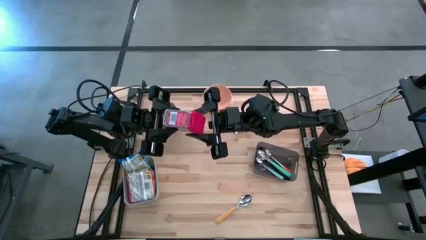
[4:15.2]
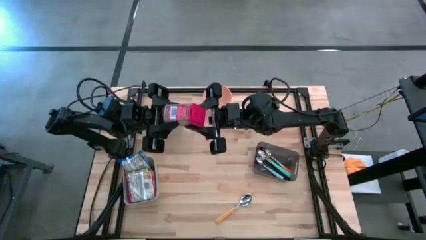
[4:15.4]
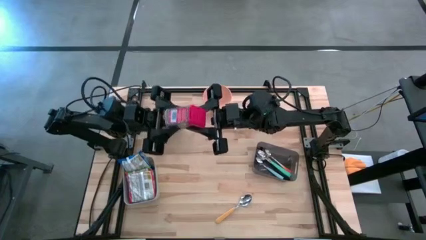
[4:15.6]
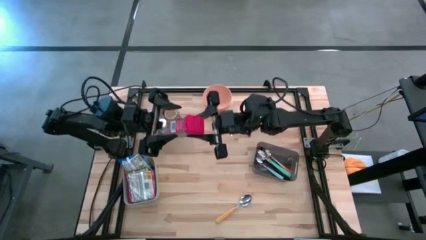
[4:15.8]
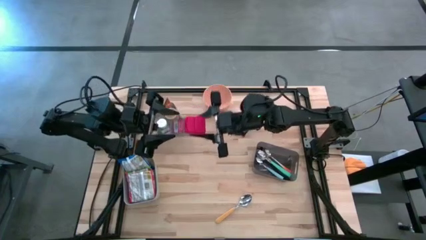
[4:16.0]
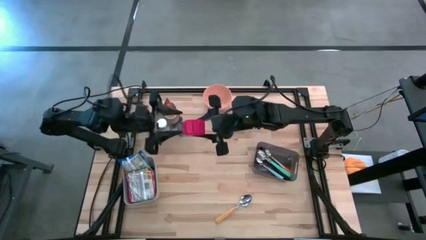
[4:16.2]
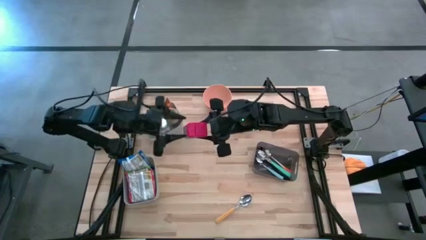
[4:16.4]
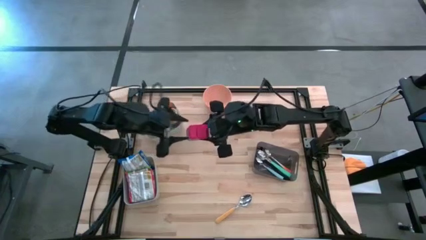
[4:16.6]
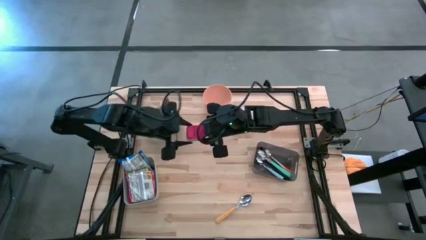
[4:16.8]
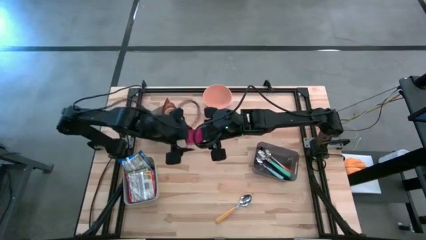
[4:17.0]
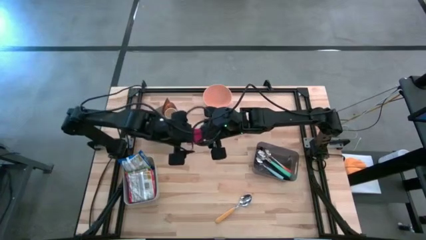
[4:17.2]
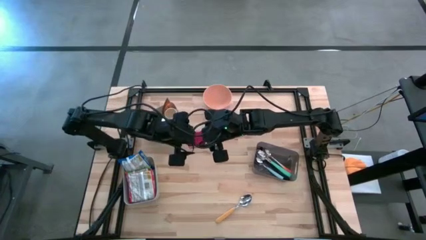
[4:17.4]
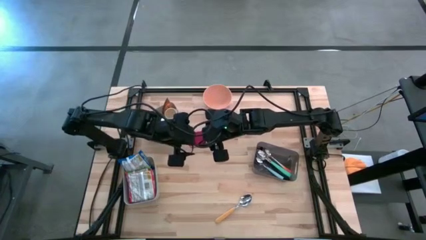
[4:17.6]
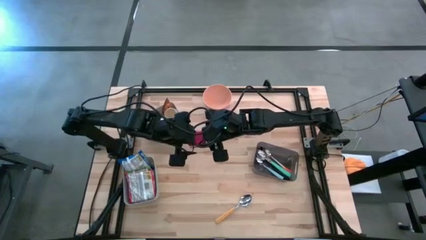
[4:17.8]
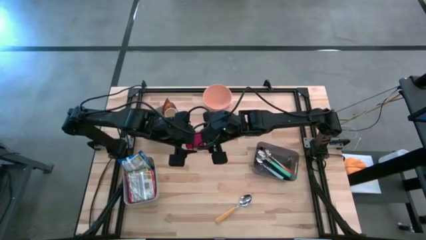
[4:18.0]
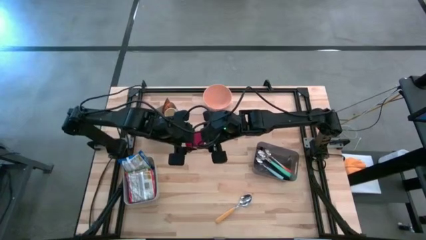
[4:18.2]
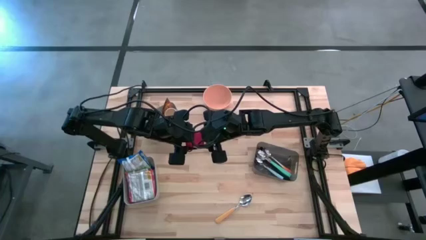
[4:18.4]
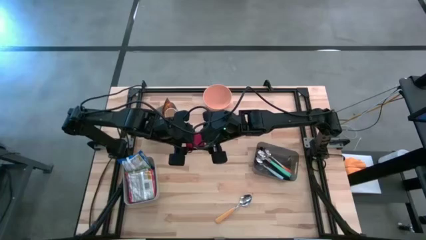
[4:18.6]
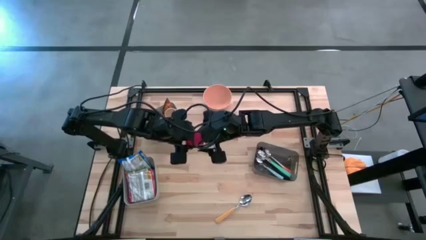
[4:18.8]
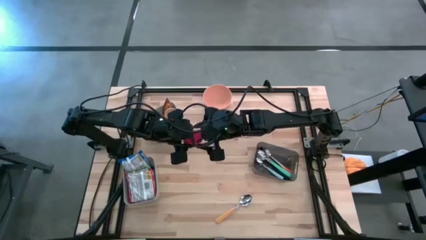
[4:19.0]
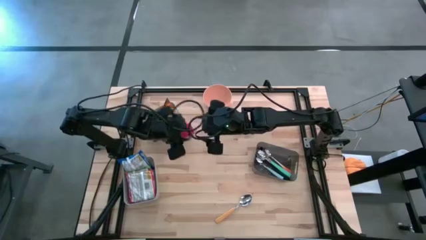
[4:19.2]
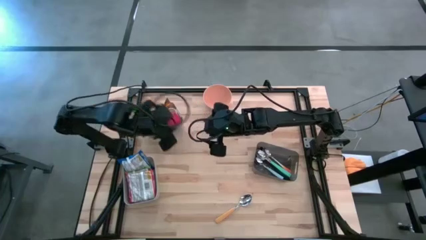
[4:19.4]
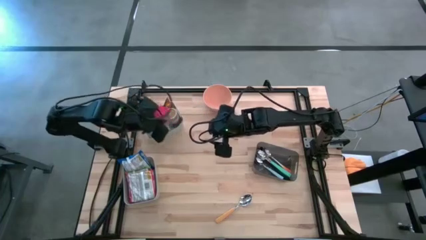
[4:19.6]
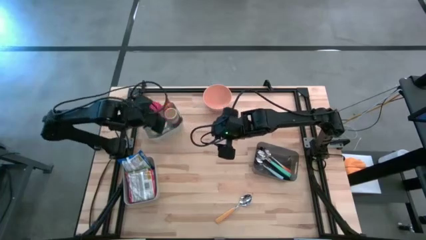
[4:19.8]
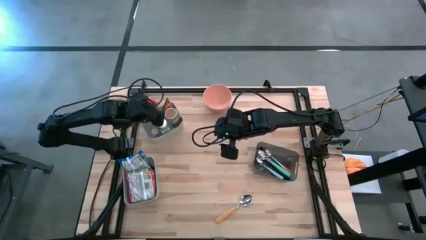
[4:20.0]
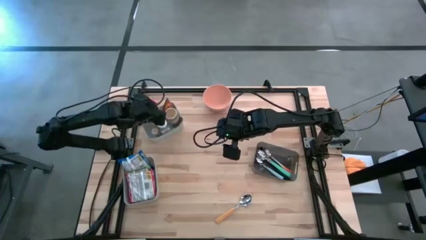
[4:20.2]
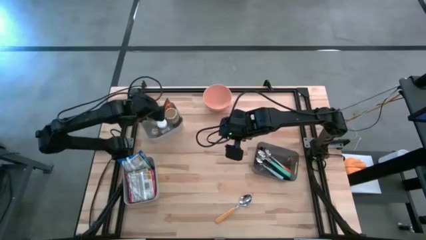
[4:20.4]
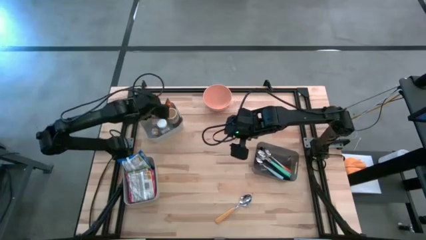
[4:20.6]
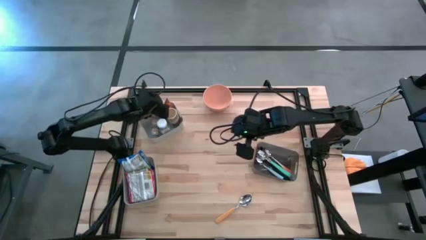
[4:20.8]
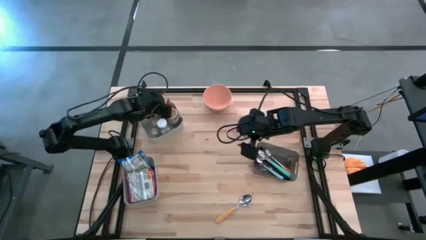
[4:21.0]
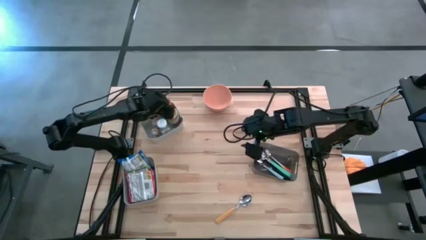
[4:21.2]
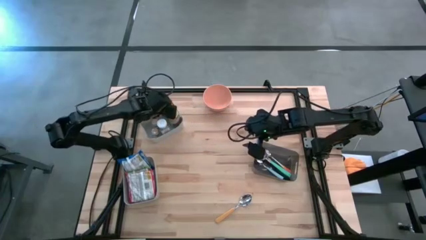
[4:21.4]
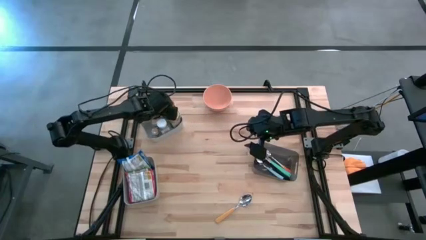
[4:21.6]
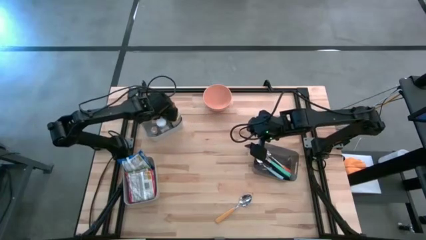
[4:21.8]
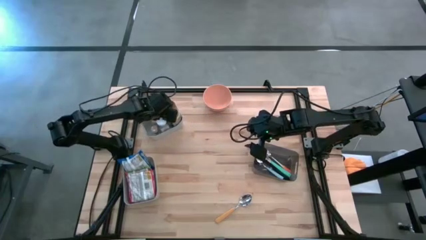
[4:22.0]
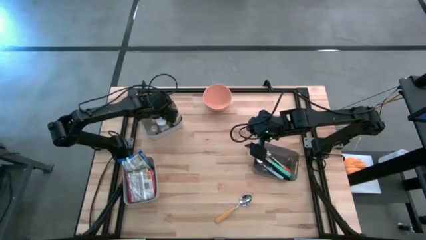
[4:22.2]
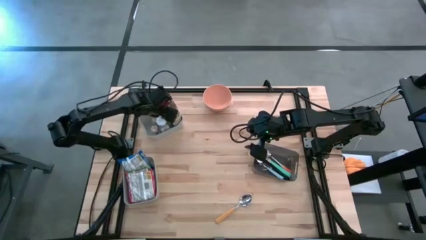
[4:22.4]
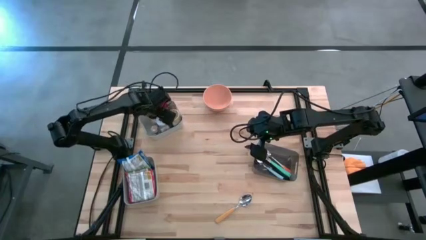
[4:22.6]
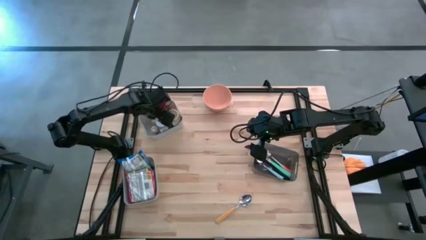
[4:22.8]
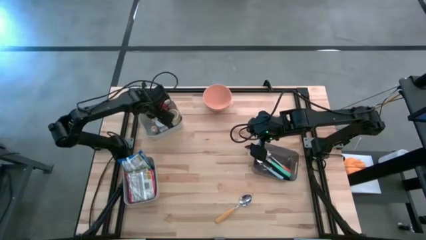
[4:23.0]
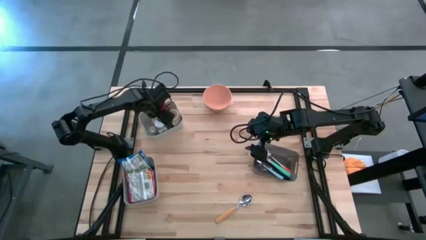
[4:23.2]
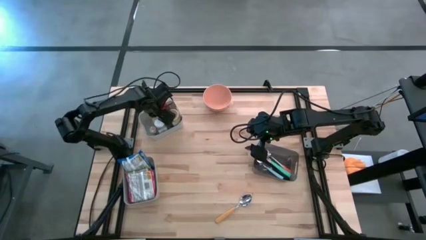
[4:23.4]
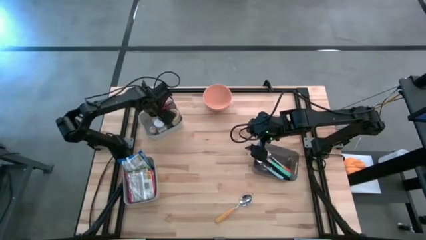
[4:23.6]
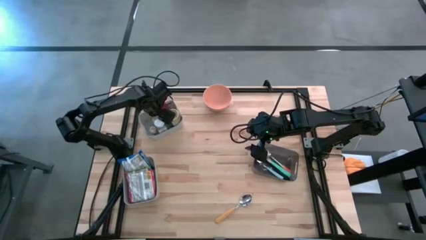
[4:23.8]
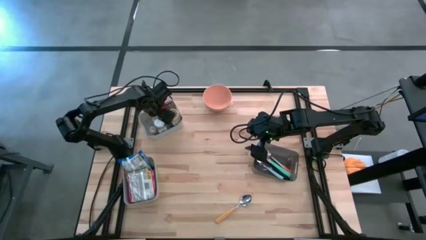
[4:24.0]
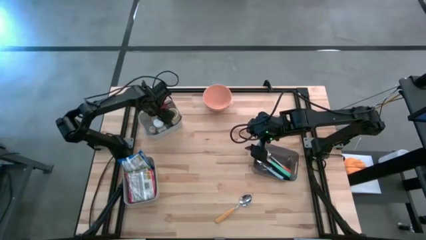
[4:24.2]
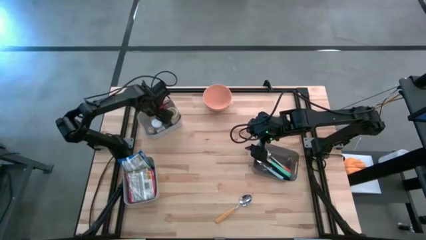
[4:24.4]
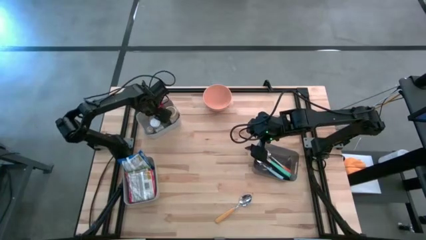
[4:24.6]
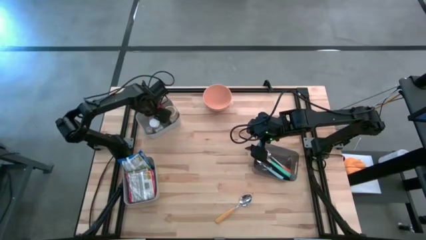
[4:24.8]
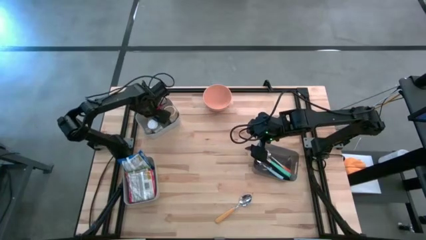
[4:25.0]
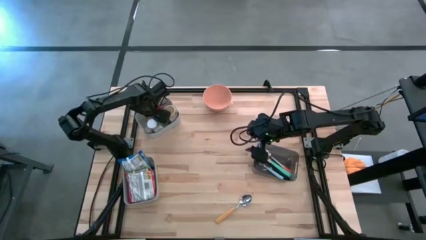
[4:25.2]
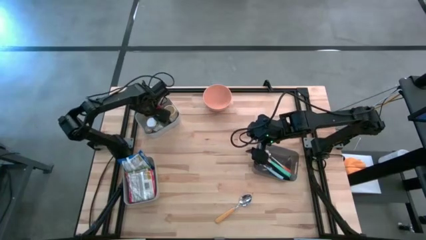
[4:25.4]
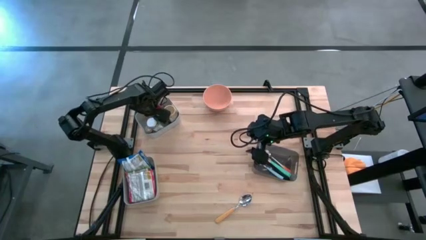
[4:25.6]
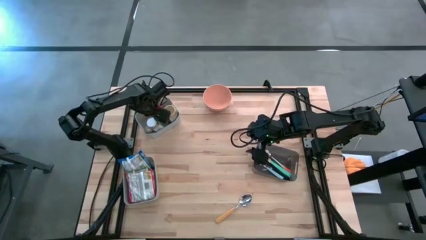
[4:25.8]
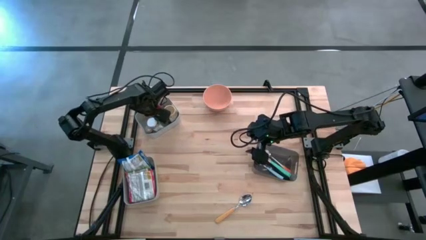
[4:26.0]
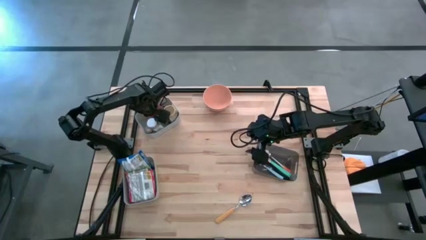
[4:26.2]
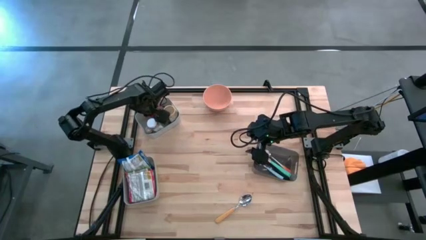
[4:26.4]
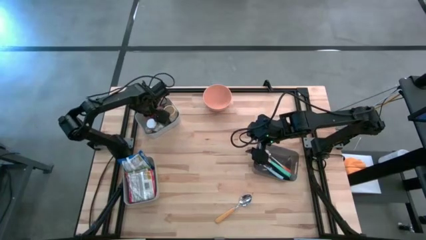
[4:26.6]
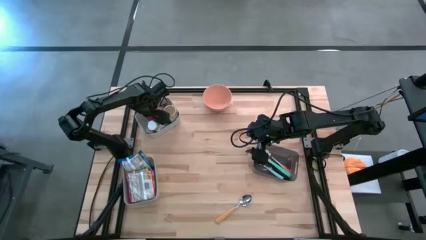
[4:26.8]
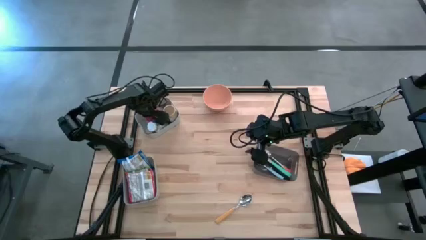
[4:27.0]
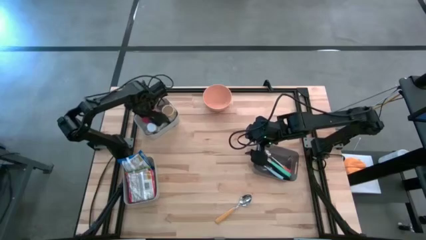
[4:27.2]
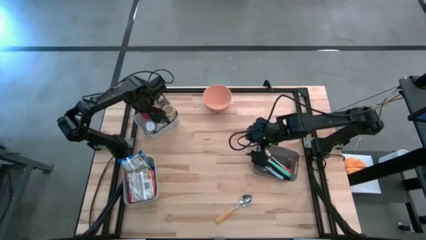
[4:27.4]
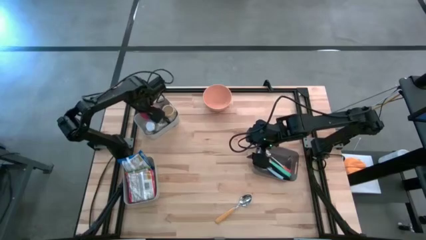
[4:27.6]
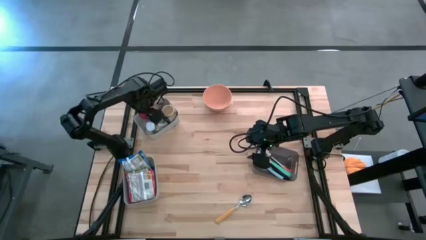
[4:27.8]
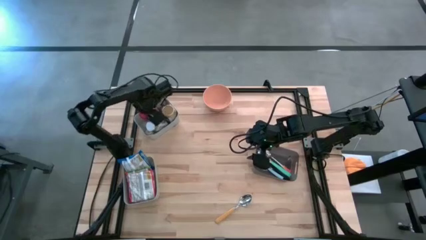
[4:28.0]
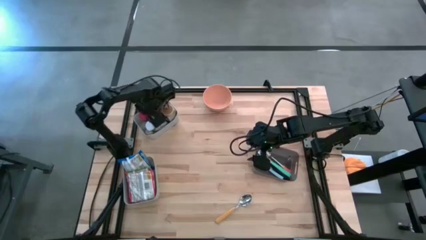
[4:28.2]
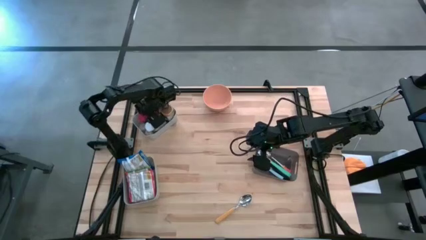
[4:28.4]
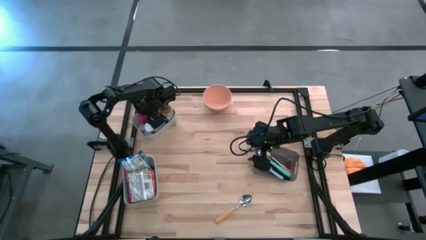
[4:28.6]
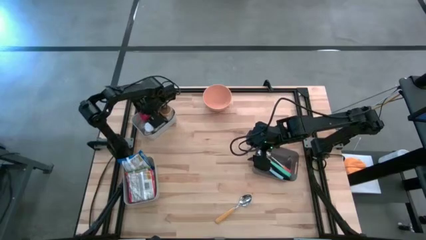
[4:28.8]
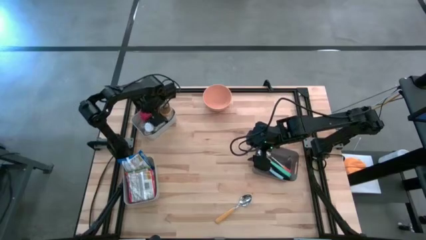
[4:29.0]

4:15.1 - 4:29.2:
Put the red seasoning can into the top gray bin
